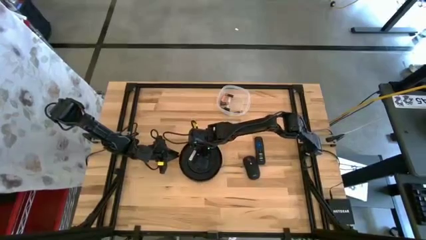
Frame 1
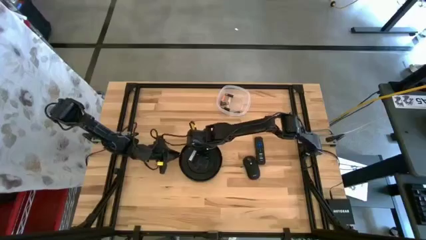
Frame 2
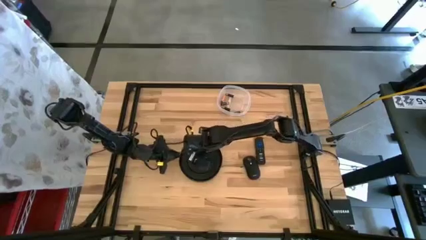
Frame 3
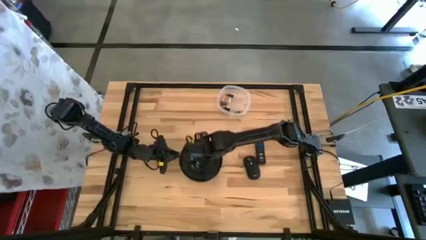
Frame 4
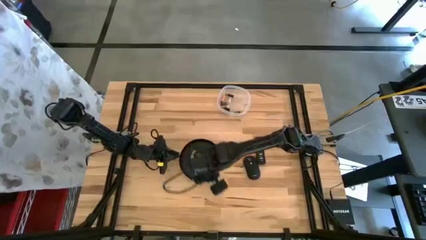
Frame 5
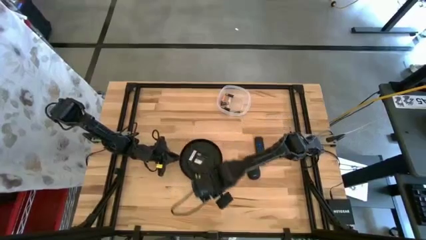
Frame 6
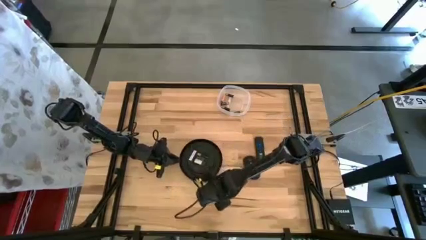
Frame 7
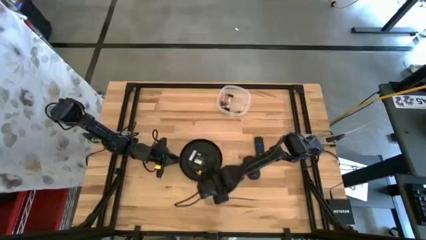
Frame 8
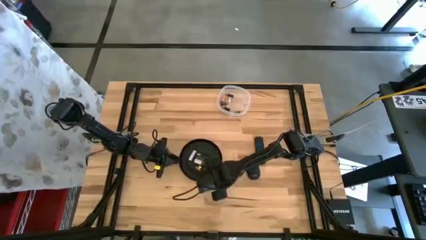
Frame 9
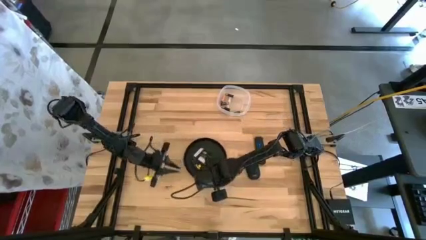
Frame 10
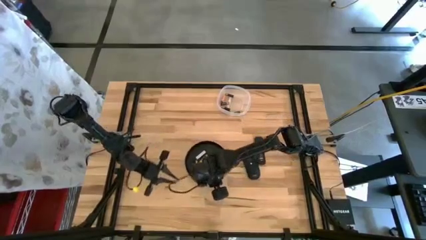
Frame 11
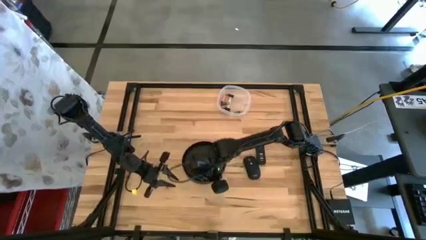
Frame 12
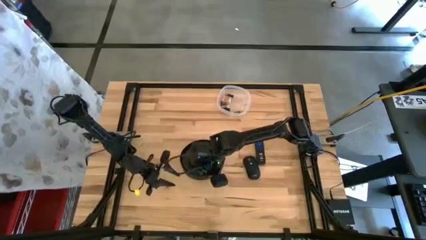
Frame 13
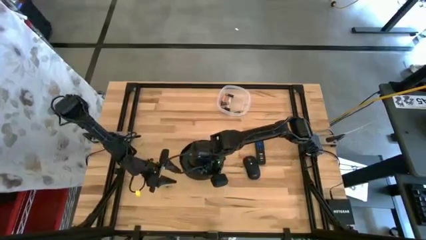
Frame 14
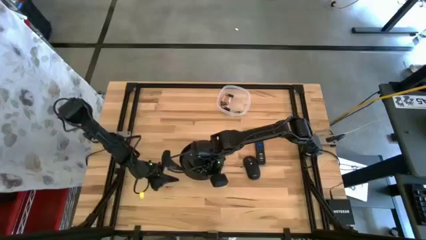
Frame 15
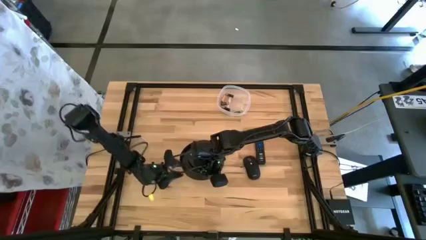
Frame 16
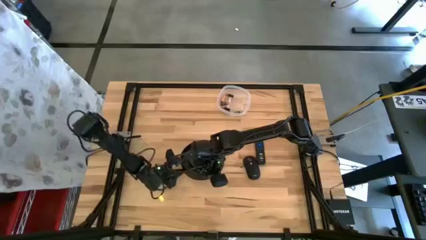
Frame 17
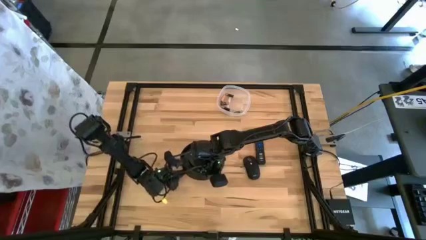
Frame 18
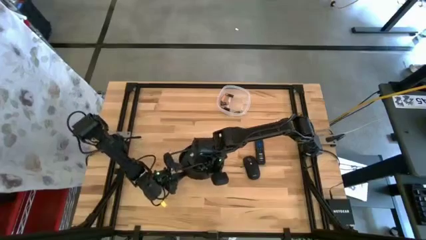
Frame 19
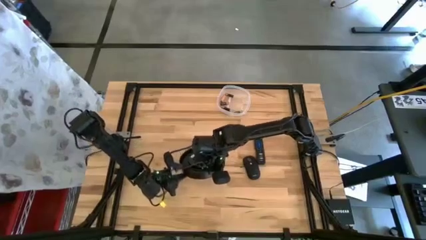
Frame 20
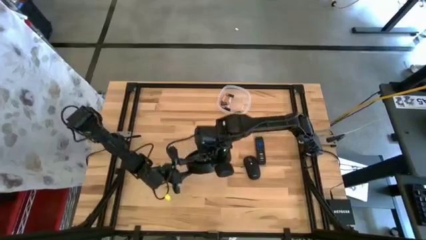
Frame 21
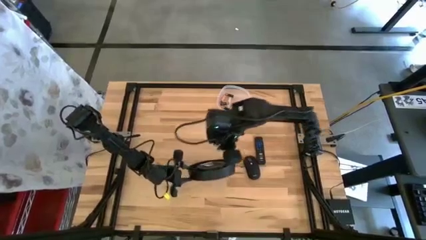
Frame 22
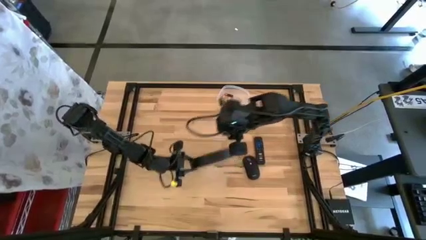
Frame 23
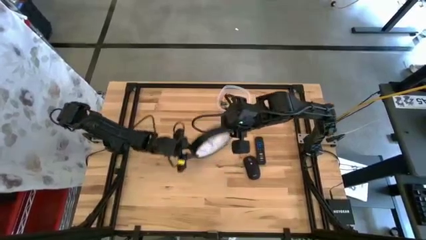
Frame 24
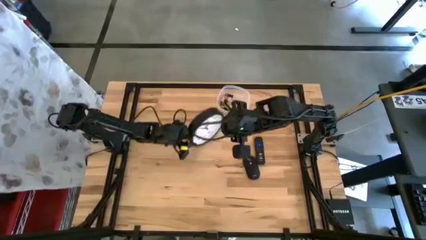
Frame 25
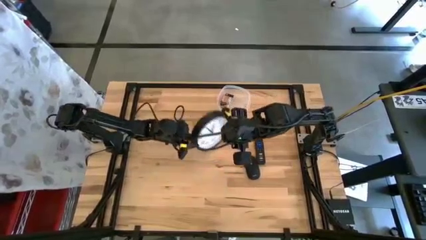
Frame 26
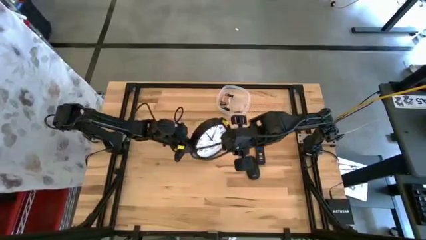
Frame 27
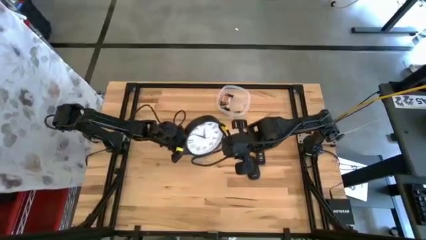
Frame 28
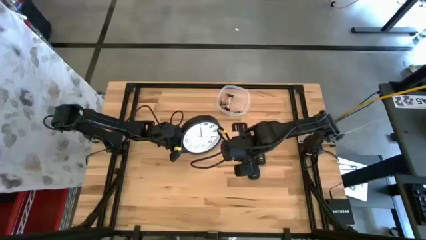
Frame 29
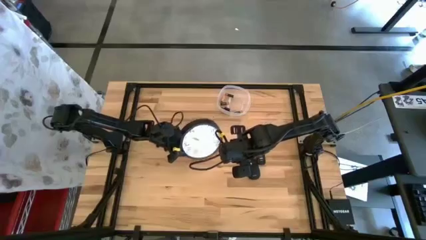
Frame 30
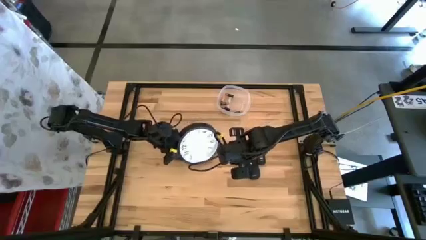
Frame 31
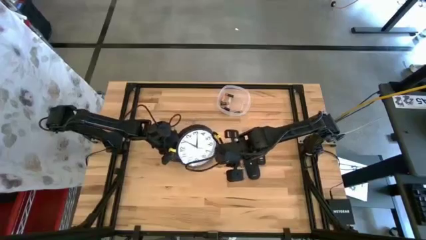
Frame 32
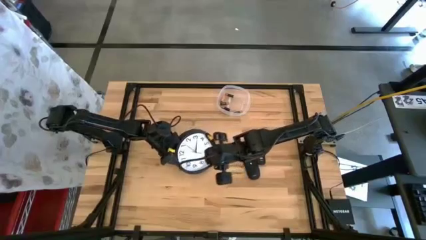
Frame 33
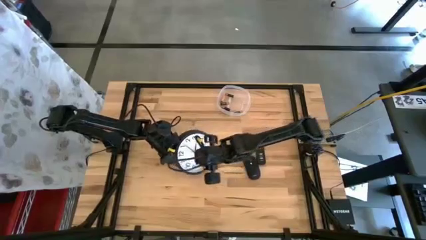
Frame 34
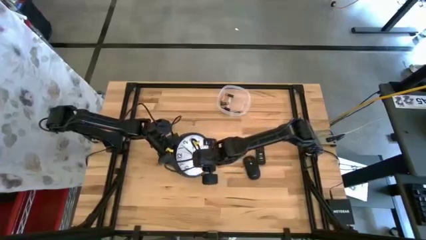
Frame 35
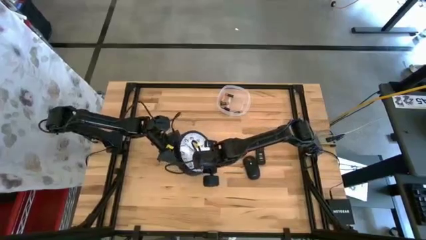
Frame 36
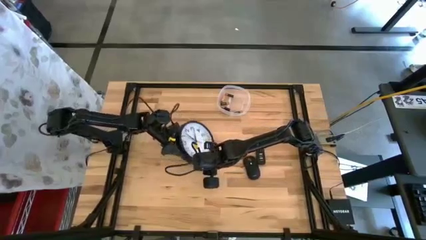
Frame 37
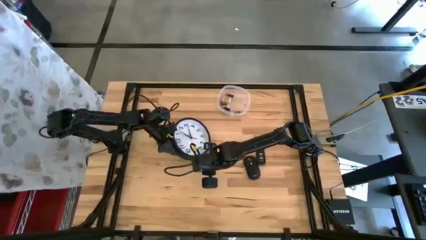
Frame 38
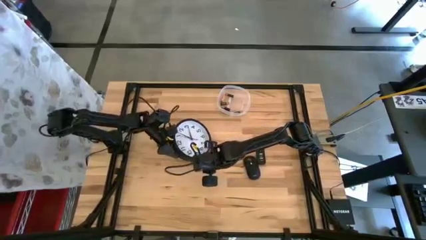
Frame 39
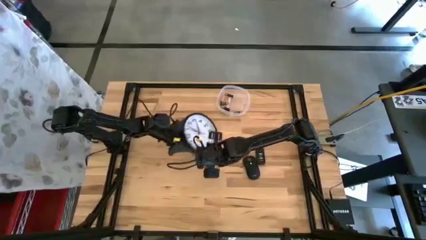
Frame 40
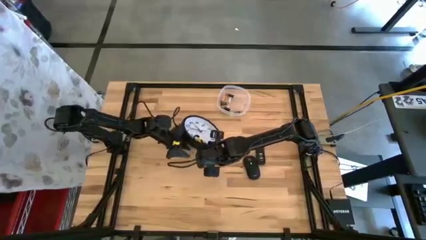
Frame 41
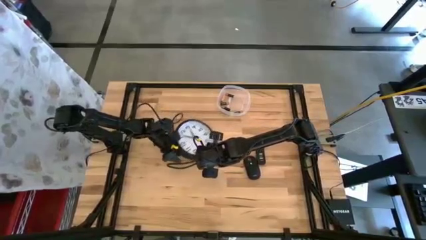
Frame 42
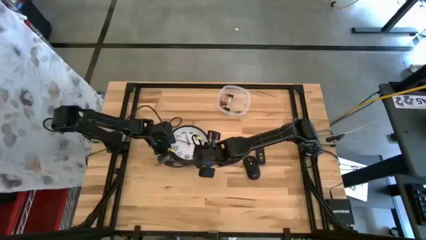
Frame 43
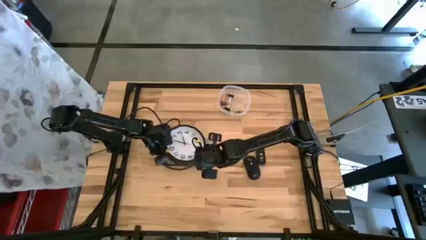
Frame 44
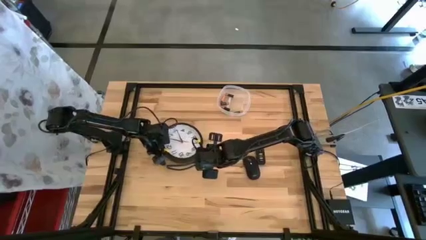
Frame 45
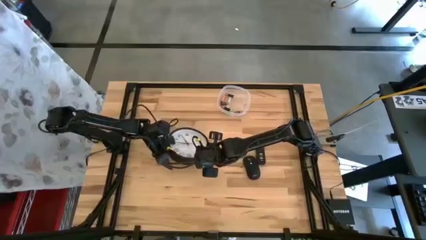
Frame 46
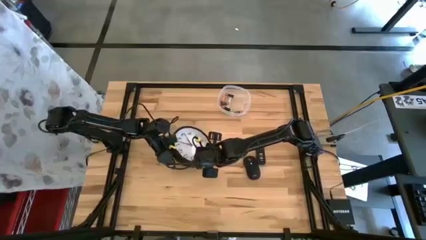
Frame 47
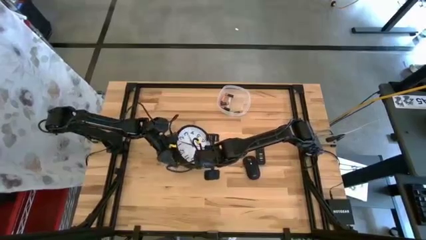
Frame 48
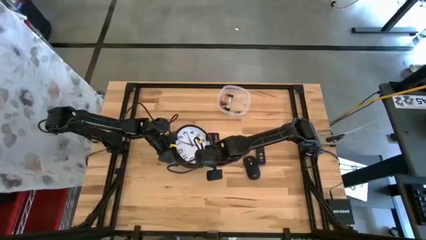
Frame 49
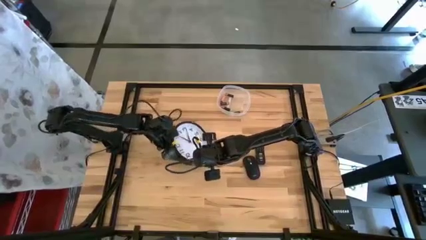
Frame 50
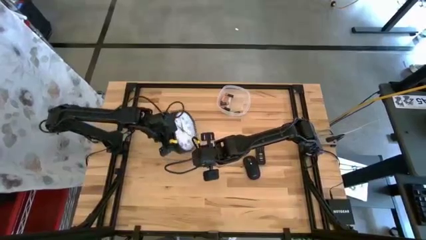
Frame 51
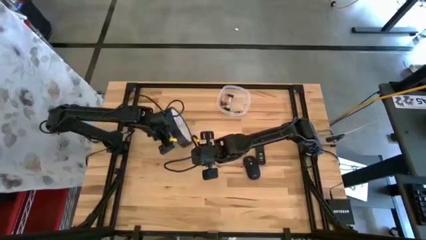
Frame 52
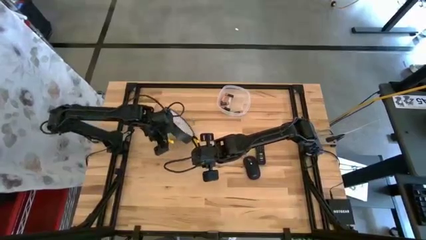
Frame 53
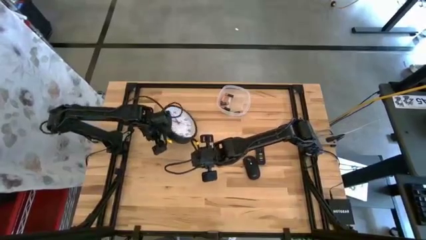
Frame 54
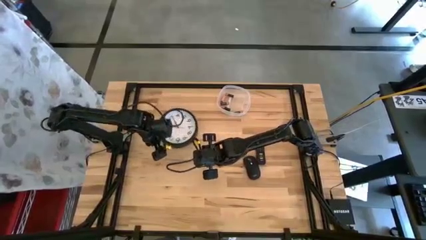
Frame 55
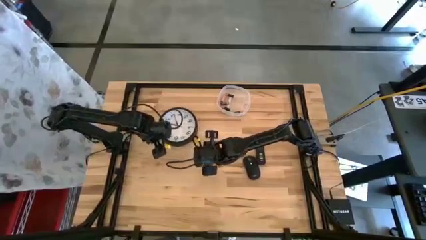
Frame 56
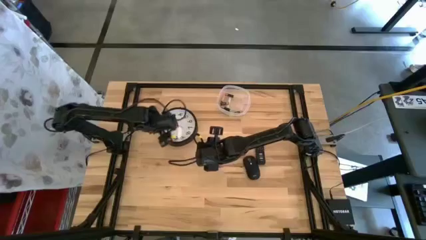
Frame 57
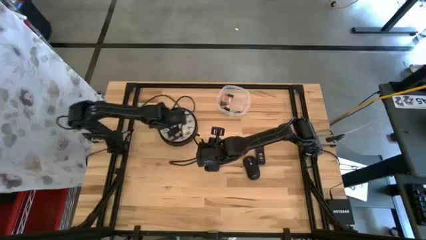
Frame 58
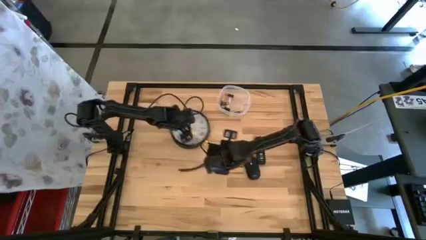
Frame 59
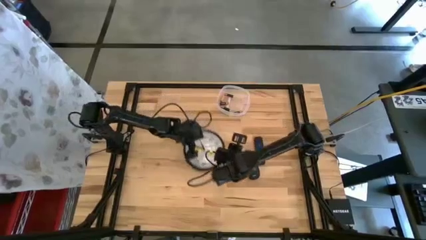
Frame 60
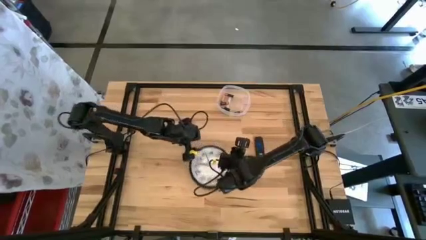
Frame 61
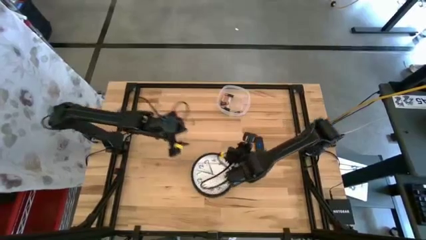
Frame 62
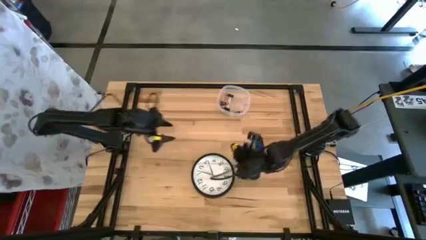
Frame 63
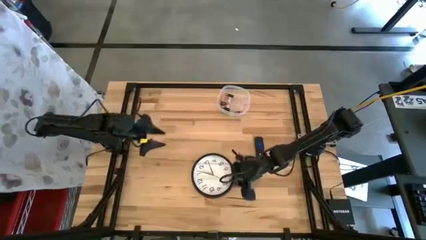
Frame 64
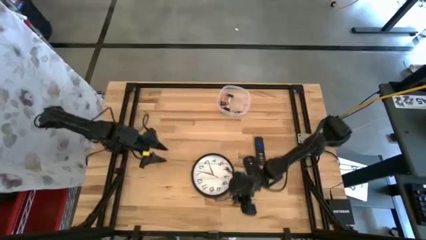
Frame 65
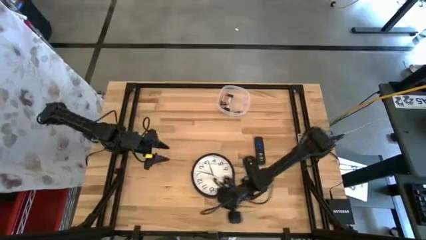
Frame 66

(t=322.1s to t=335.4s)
Task: Insert battery
Insert the black battery into the wall clock
